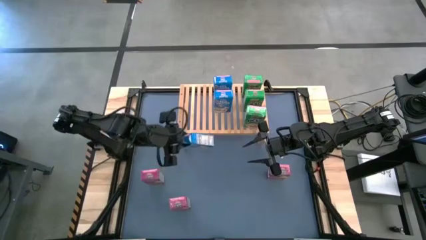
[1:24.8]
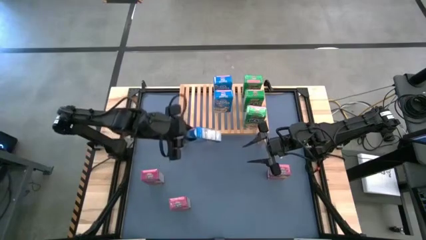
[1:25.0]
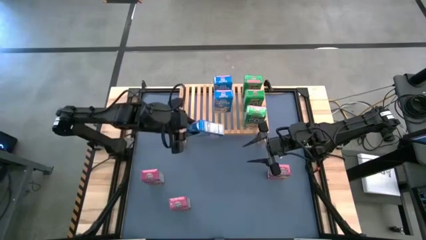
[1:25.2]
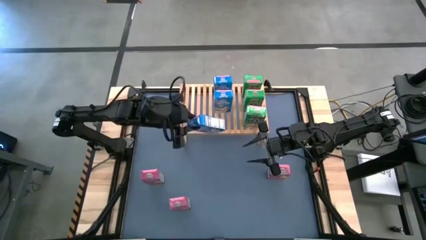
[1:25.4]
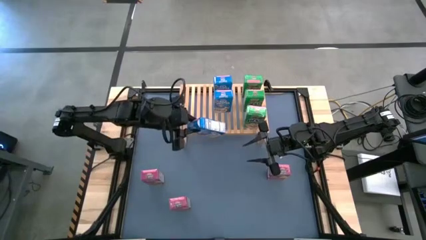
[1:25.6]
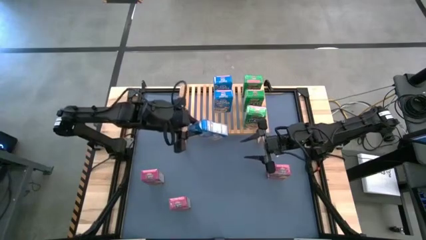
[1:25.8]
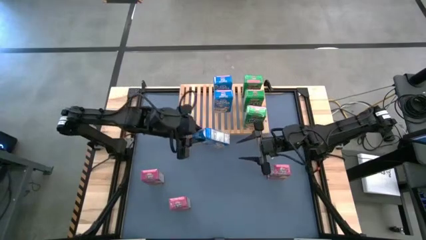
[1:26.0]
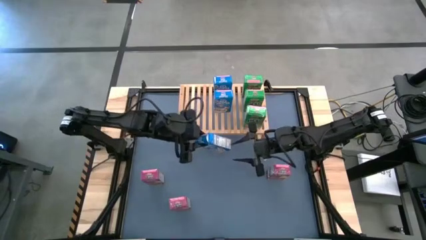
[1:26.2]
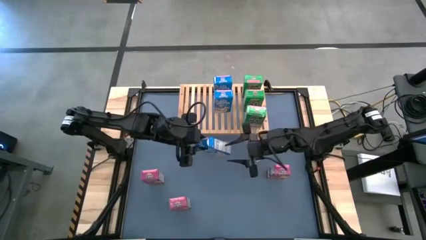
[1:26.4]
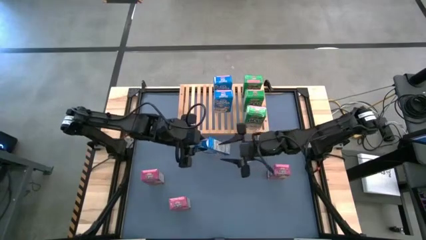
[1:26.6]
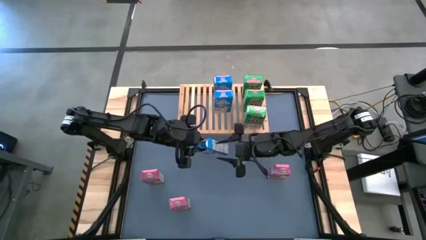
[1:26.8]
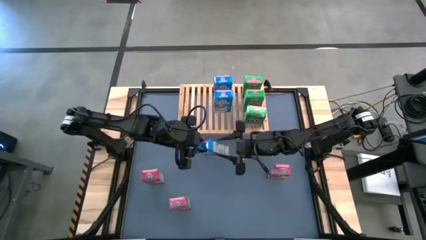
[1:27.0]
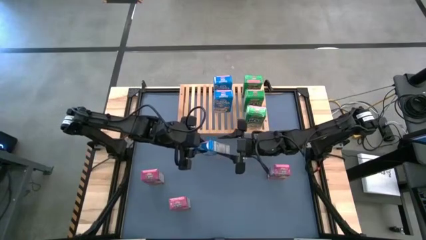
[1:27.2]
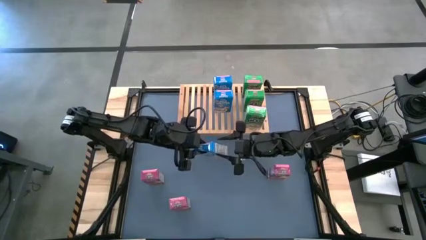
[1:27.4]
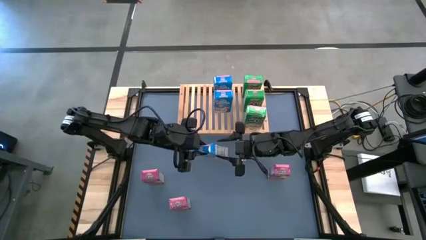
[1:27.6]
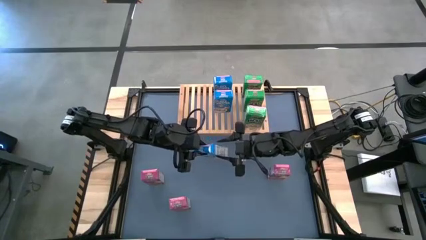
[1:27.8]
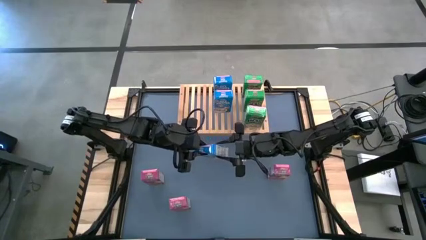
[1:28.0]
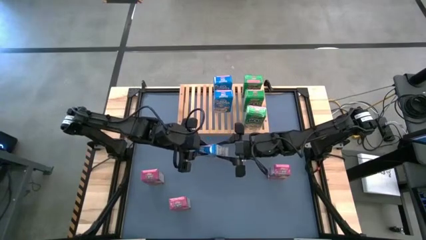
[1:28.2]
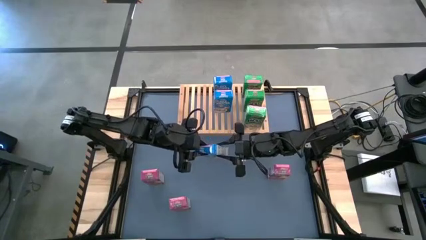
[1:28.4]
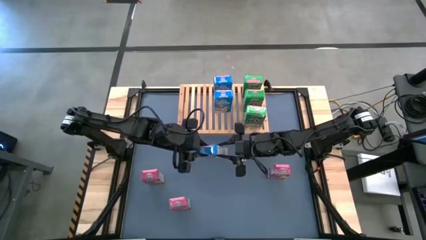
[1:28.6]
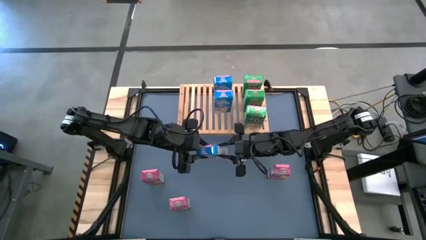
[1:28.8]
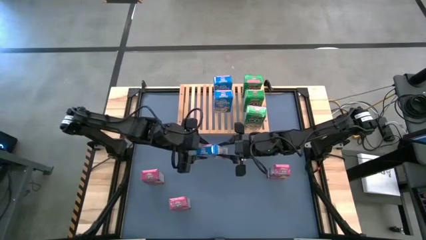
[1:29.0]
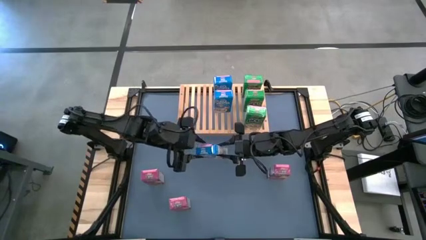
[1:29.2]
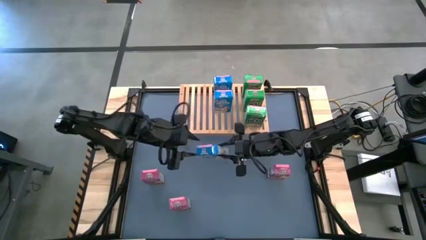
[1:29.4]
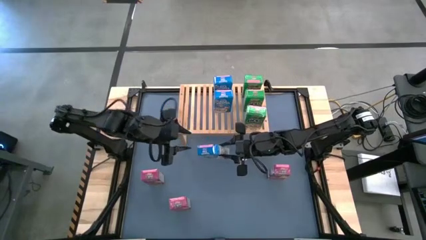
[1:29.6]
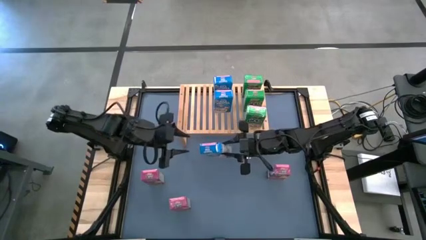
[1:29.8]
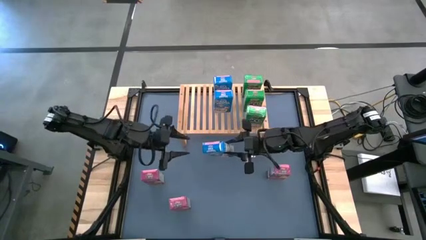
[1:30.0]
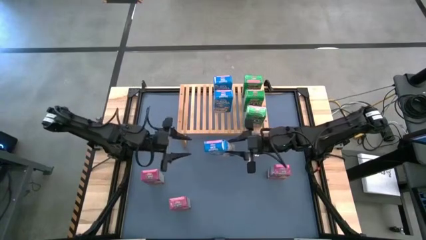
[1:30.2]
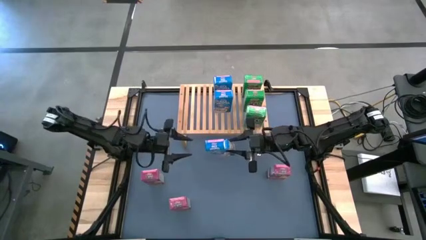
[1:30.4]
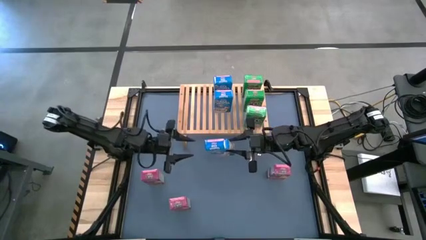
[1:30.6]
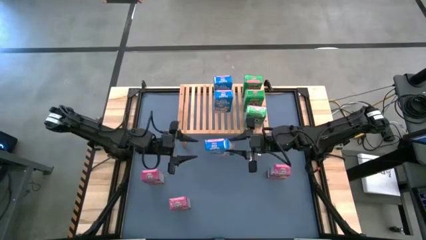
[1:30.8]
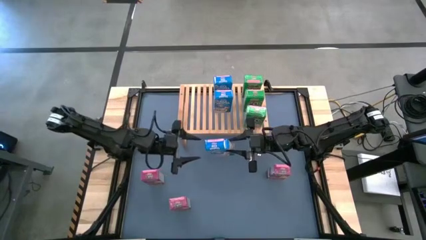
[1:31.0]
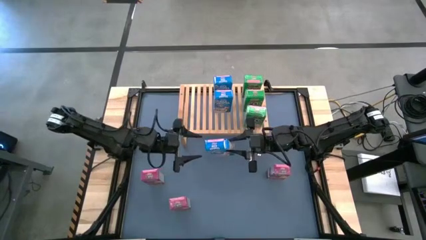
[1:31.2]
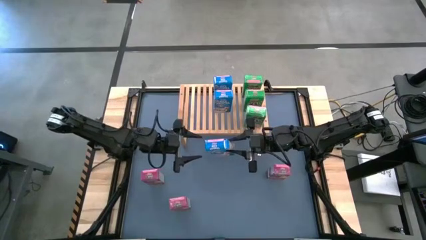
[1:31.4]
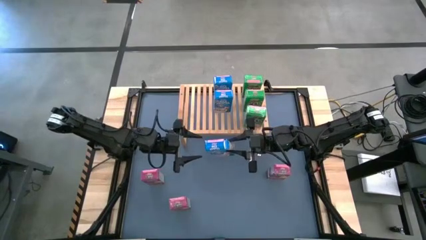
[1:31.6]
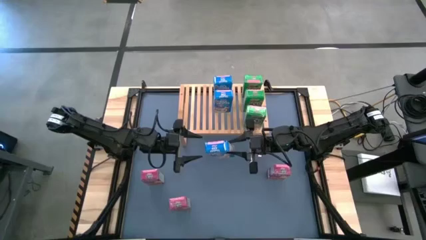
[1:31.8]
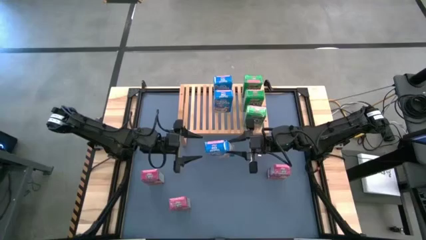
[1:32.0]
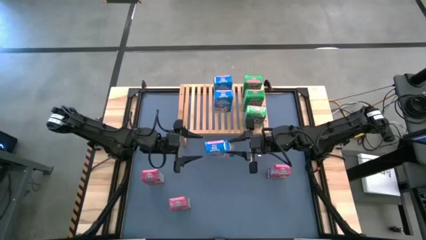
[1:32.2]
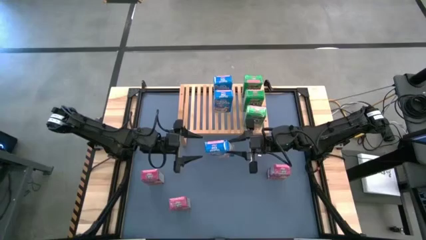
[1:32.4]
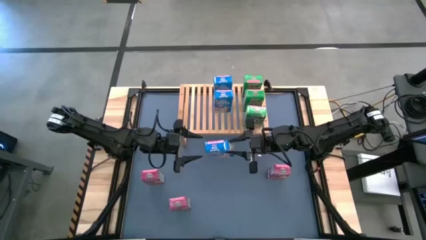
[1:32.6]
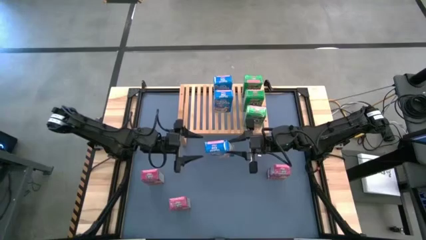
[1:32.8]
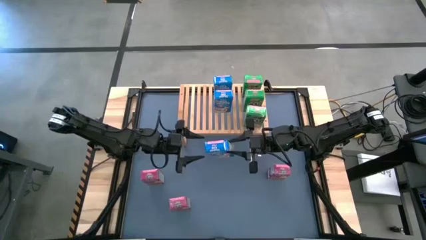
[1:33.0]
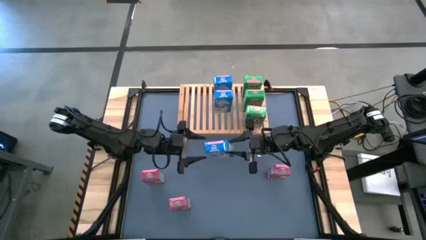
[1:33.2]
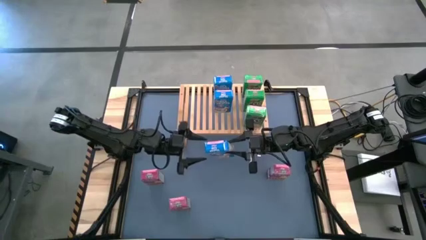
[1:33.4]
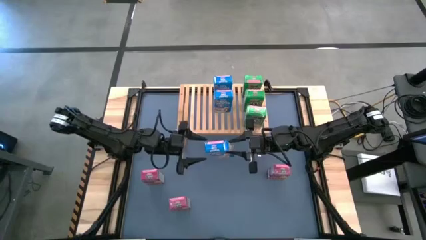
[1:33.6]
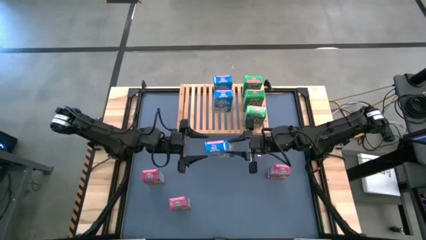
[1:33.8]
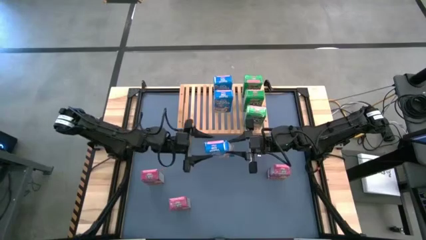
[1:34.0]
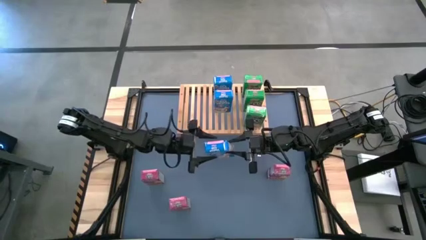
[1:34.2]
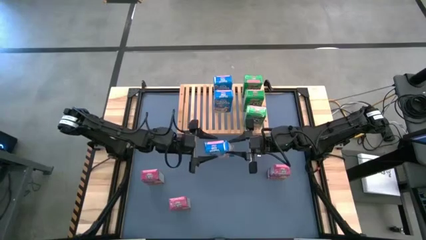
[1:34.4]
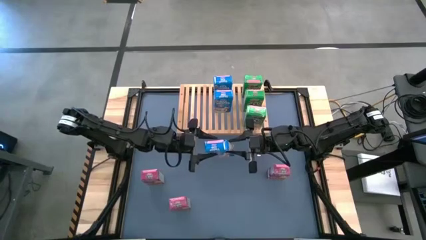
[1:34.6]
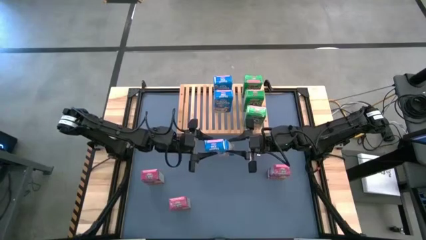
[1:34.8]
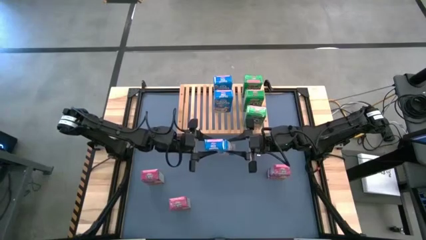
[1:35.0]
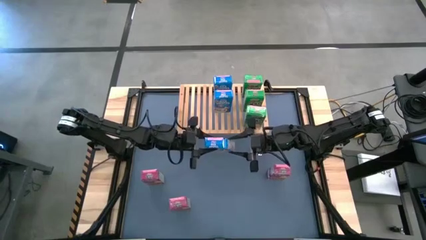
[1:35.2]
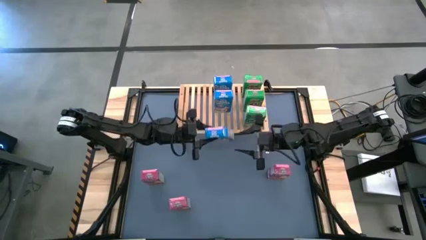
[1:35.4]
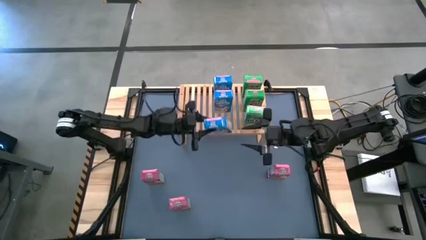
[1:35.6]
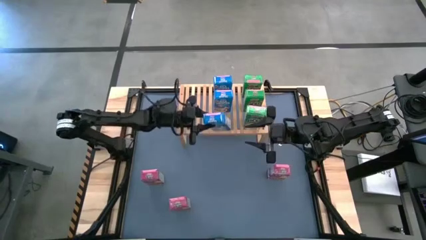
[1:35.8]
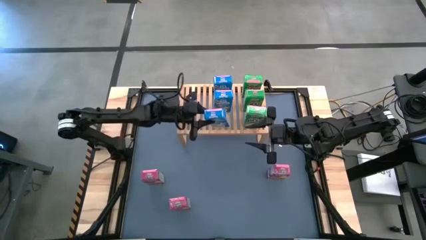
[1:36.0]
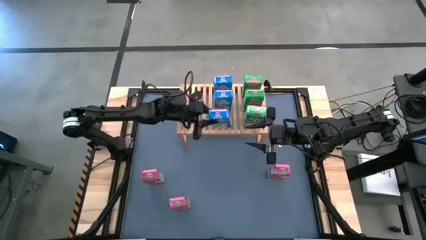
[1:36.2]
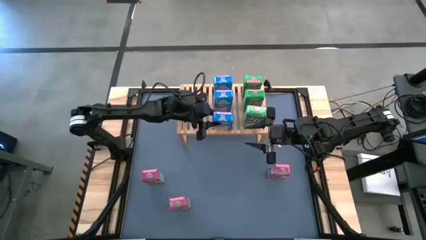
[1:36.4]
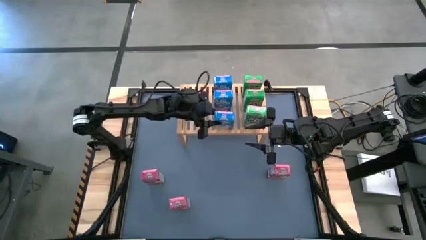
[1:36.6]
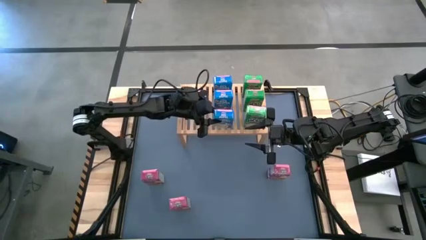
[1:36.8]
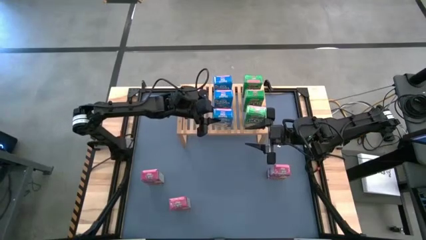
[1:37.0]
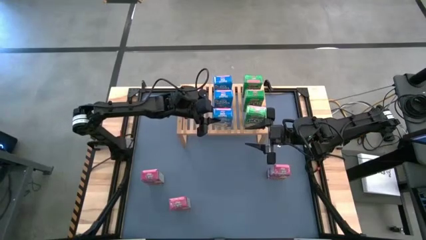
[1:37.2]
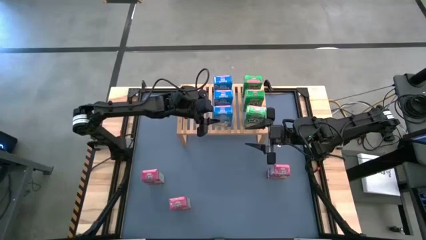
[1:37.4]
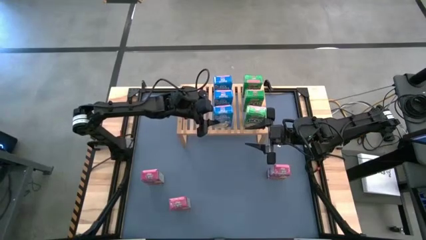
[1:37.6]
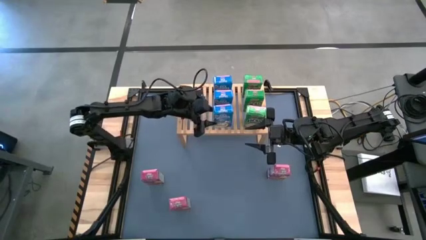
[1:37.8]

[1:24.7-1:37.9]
Task: Stack cereal on shelf
Put the blue cereal box on the shelf aligned with the other blue cereal boxes
